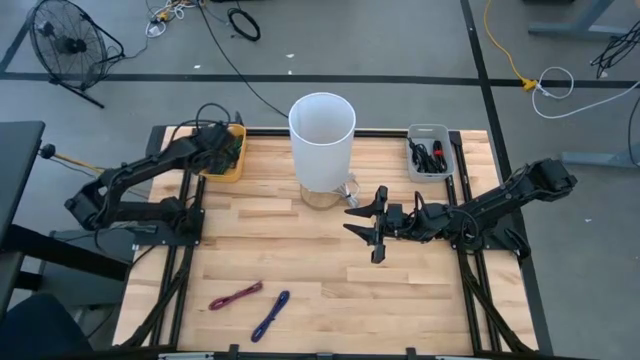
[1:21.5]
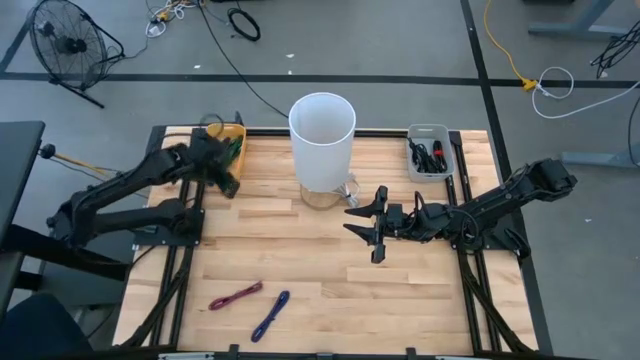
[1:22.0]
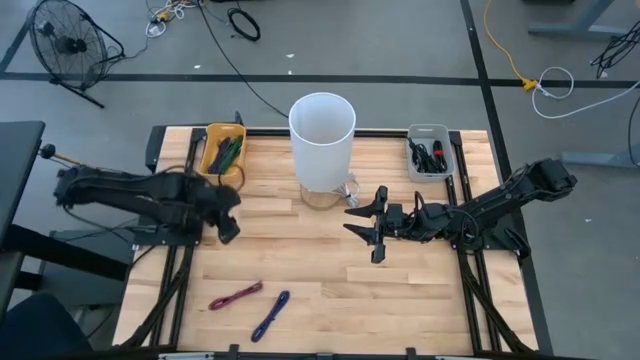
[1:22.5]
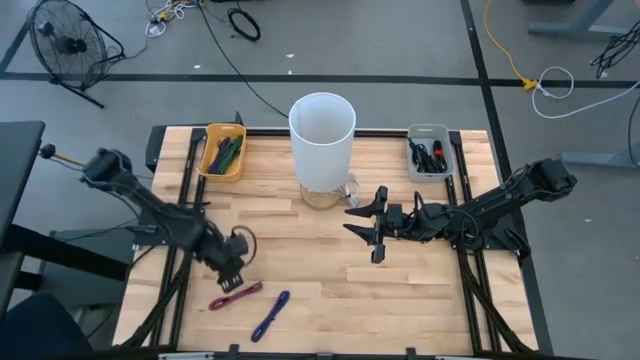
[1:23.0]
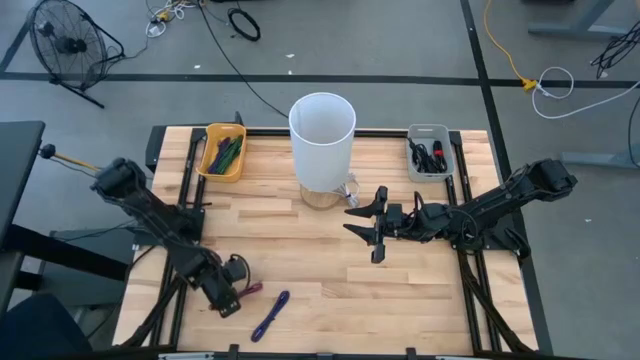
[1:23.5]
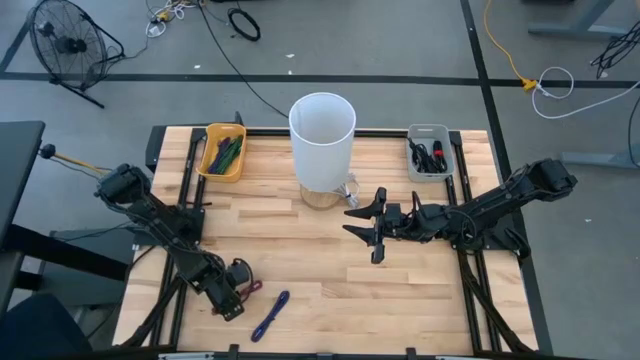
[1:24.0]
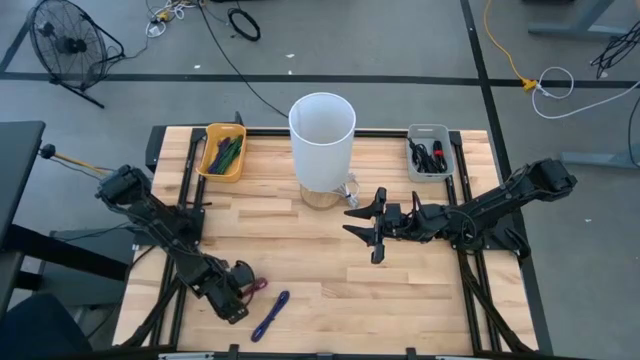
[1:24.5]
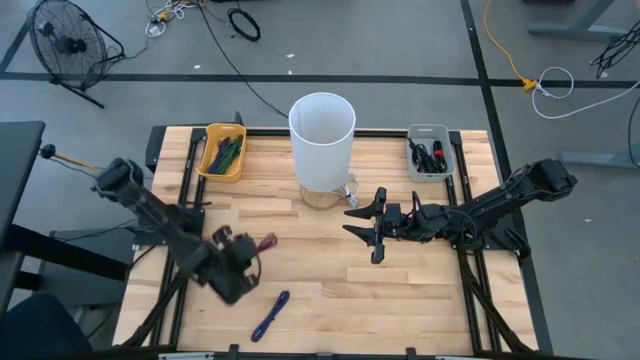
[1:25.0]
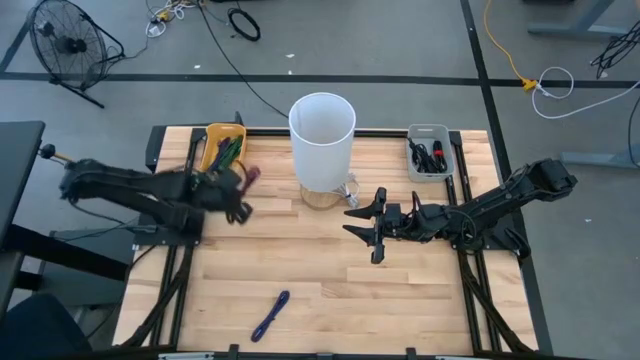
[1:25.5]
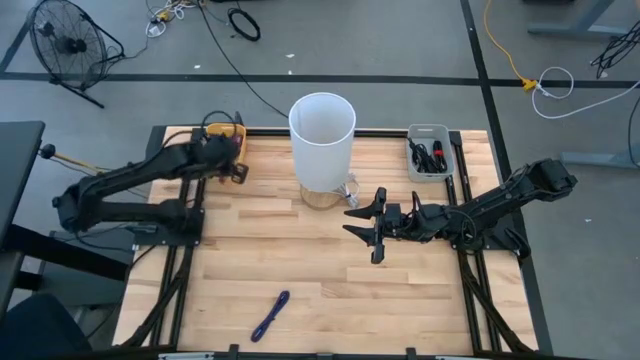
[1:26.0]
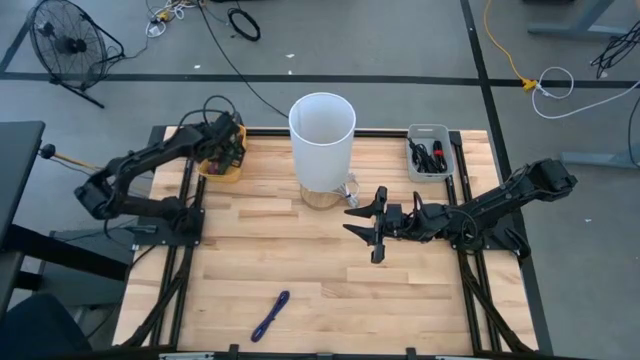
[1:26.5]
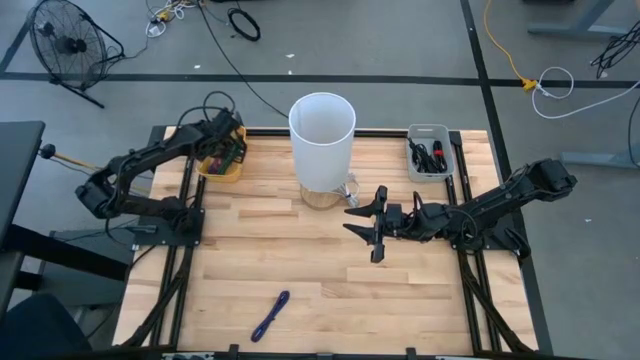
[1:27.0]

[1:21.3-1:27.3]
Task: Pick & Place USB Port
Put the pink USB cable into the yellow bin

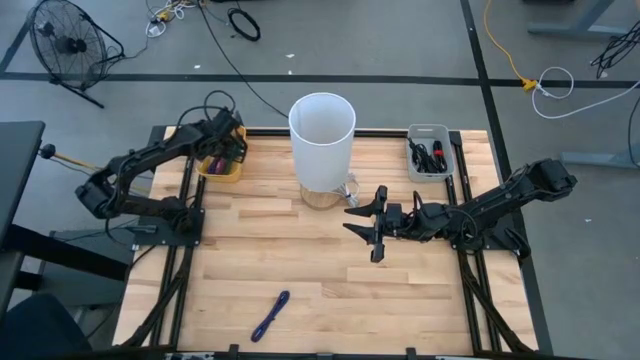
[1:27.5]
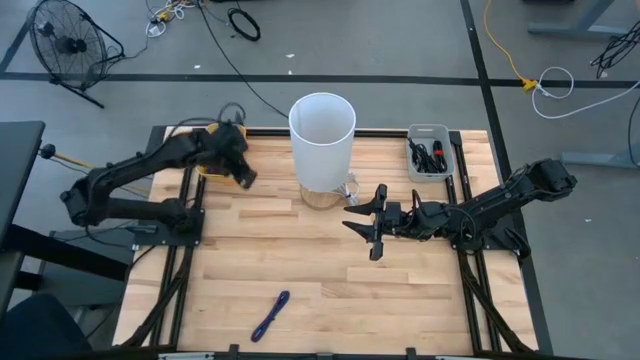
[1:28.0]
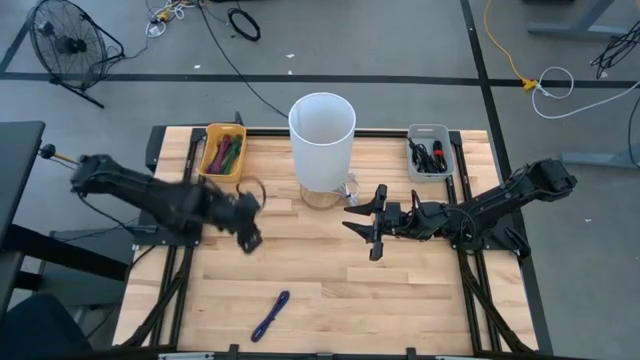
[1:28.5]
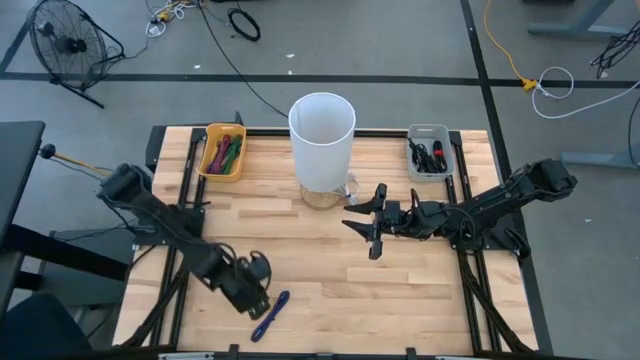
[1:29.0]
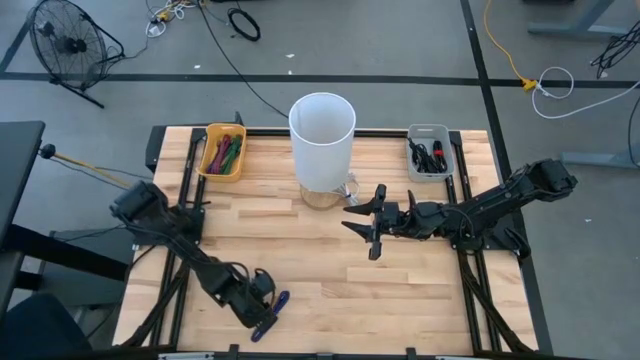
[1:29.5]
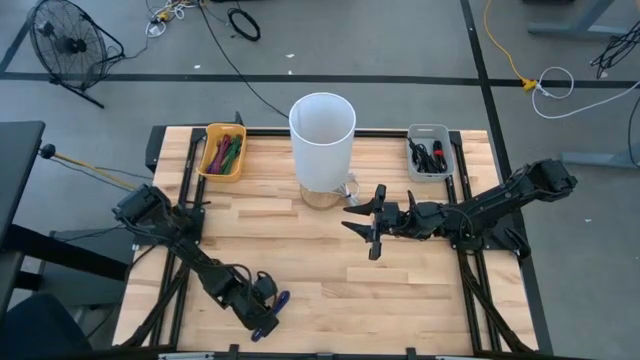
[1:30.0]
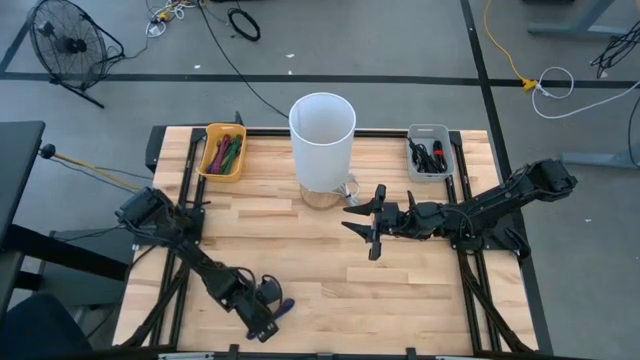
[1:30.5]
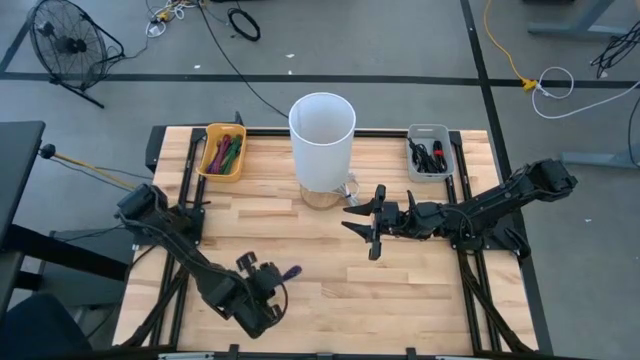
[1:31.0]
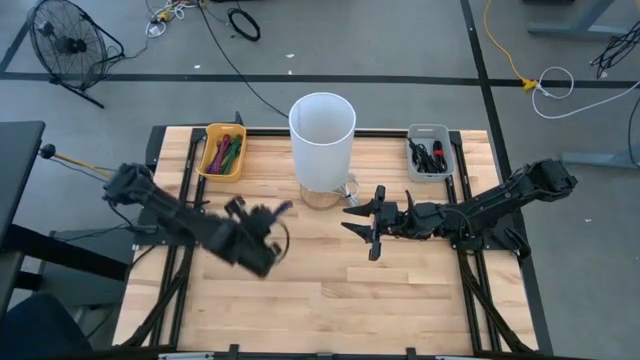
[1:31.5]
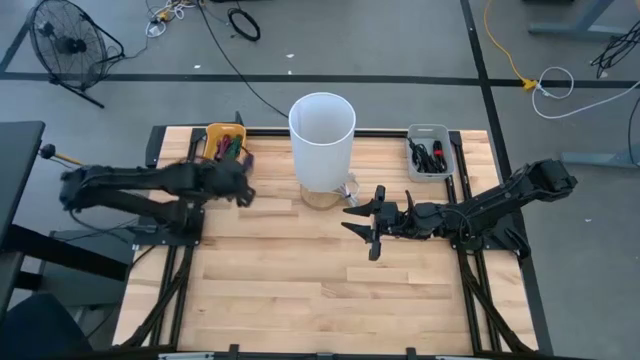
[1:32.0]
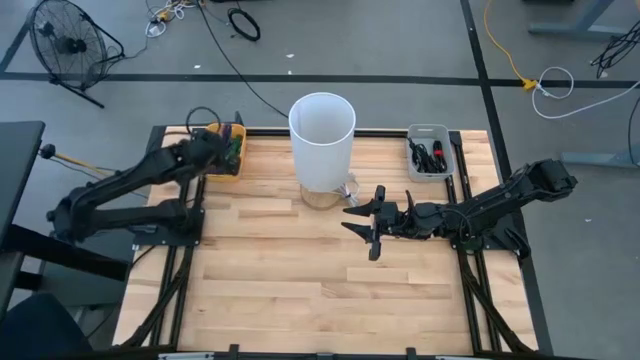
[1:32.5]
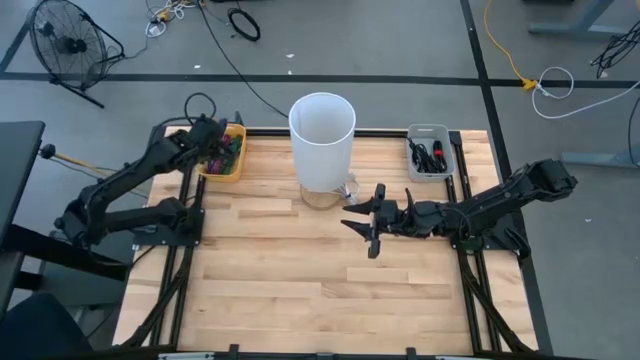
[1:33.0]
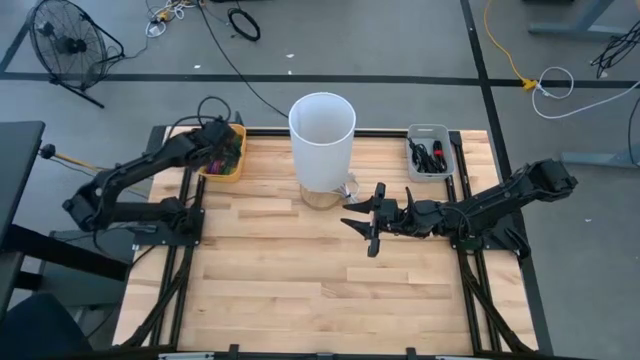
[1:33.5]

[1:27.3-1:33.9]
Put the violet USB cable into the yellow bin

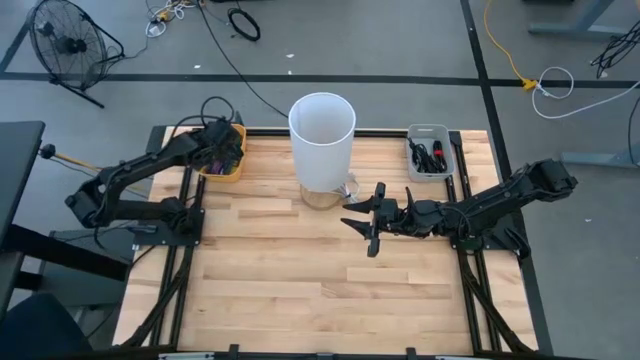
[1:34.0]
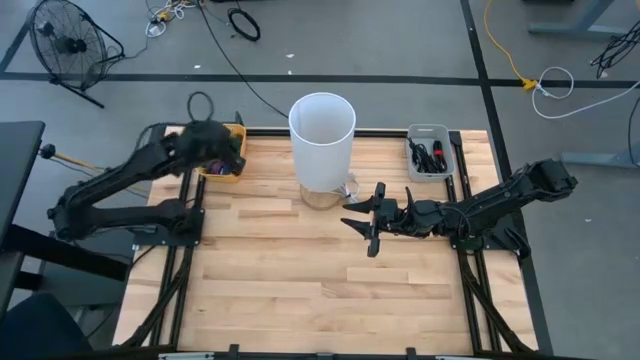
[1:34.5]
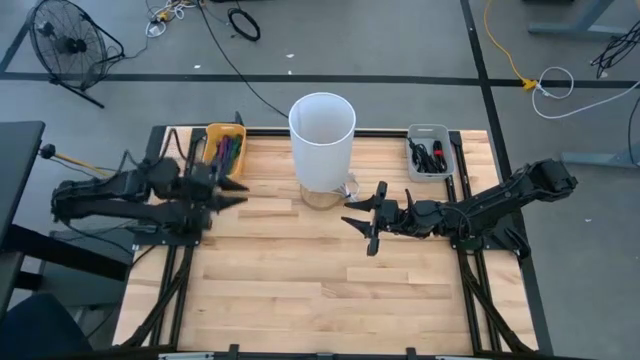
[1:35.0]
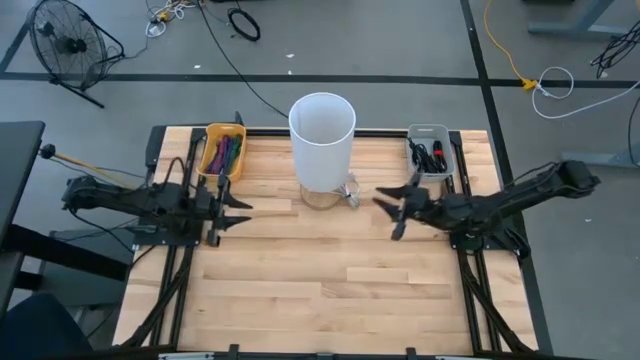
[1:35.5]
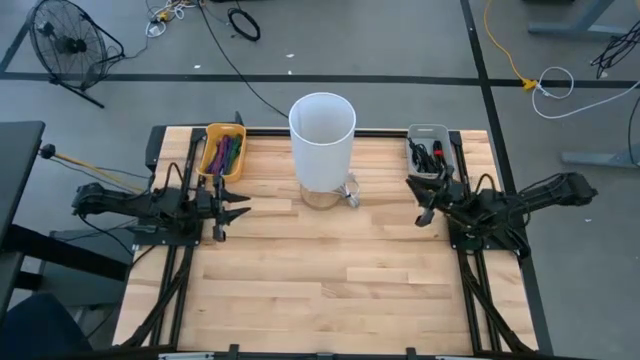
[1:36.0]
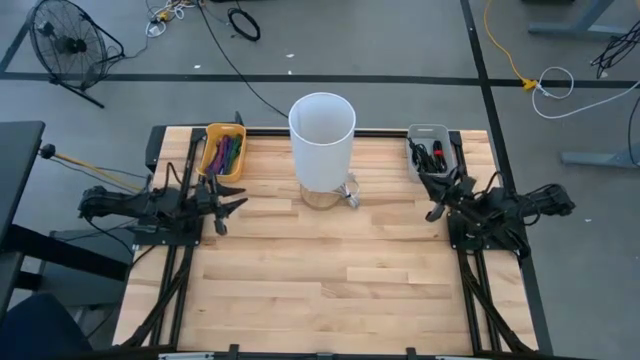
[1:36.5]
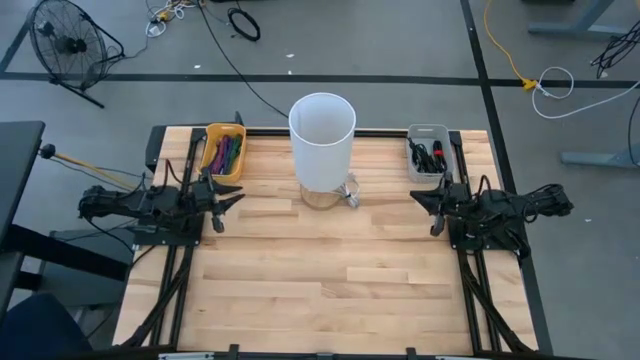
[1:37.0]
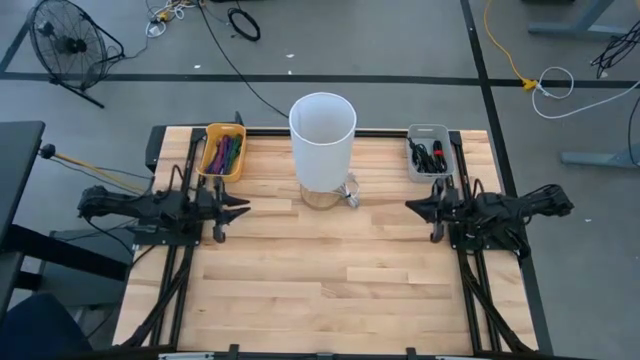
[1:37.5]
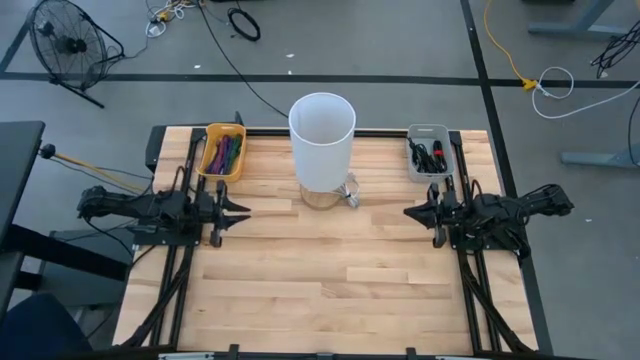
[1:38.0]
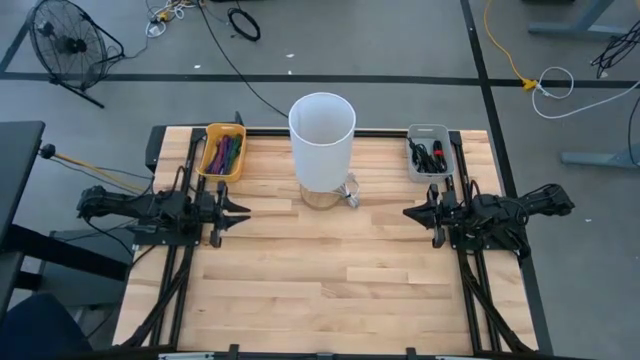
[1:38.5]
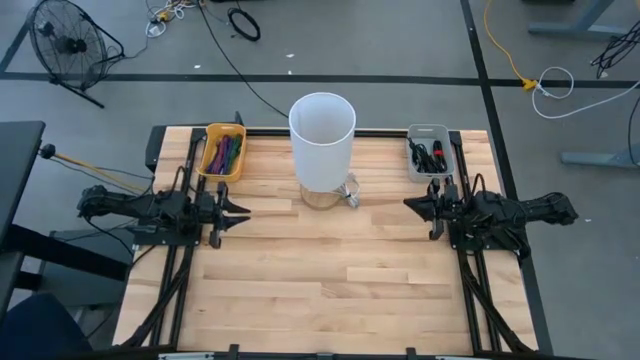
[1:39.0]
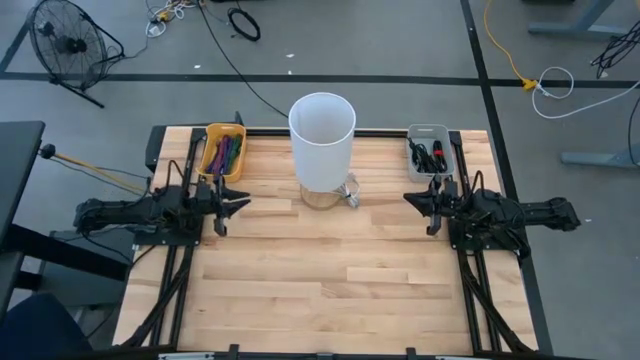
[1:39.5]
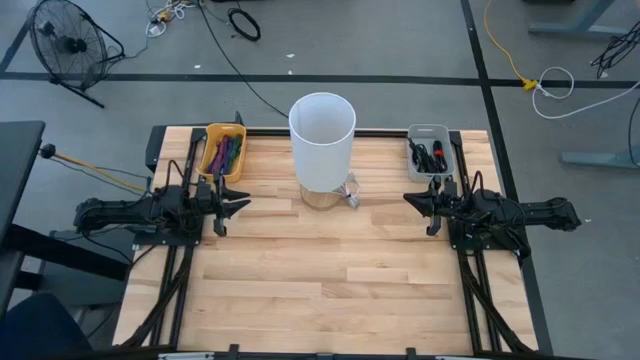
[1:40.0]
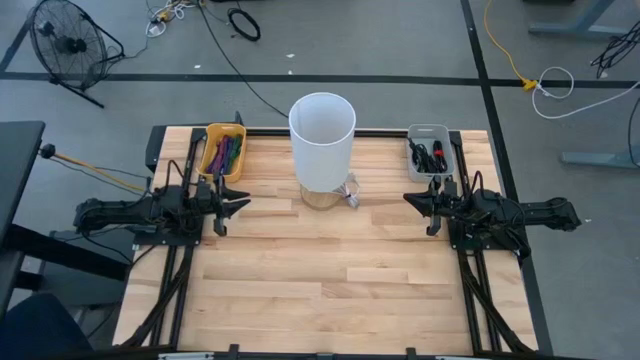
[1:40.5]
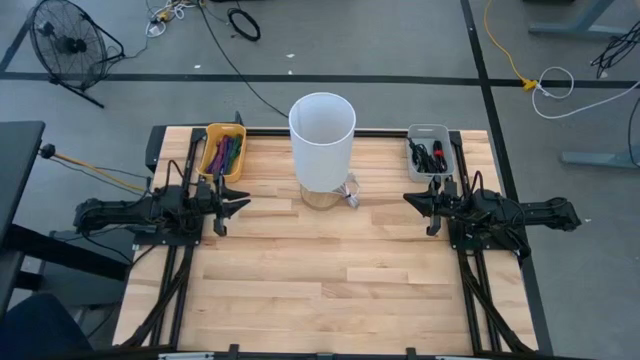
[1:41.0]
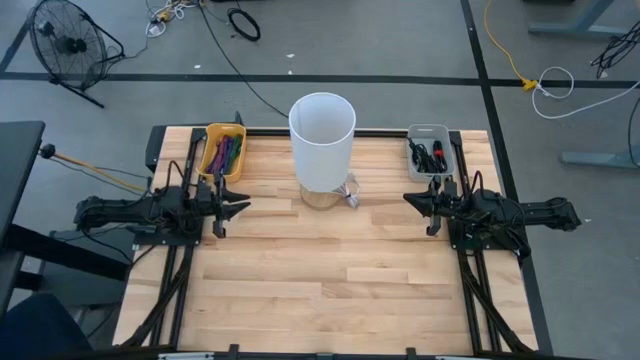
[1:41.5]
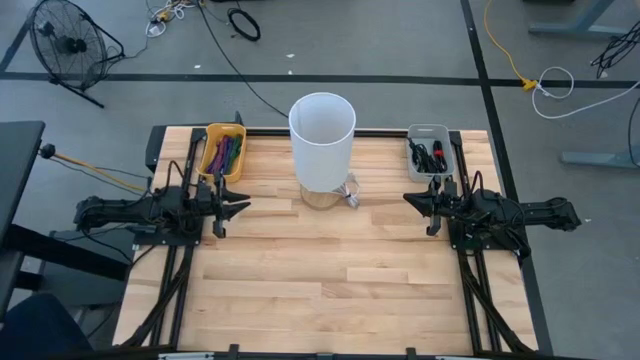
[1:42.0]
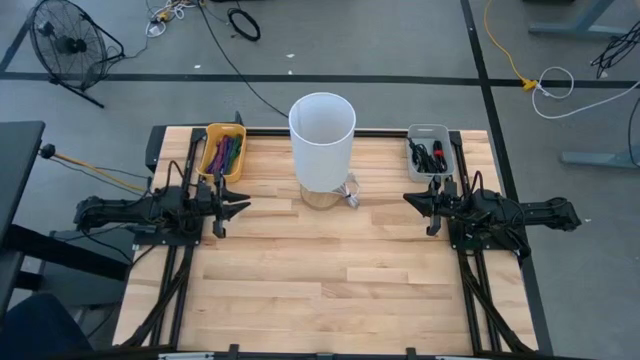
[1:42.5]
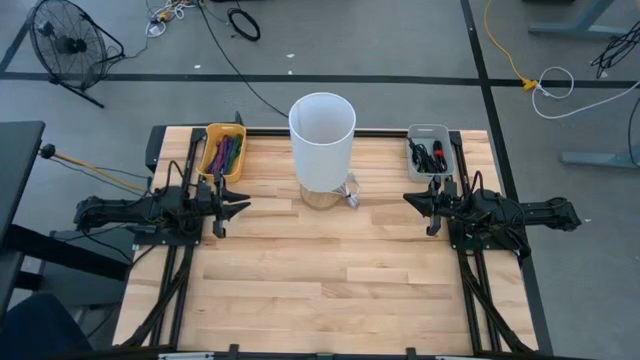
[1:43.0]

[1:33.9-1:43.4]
Return to Home Position

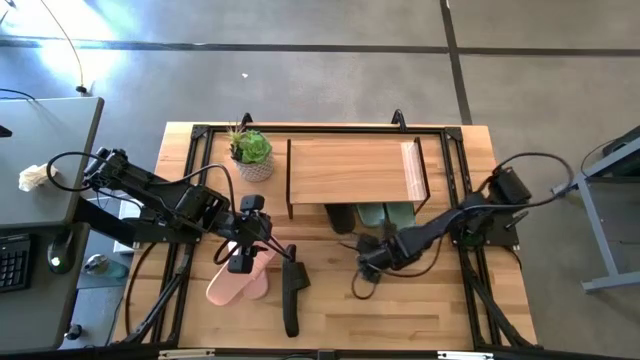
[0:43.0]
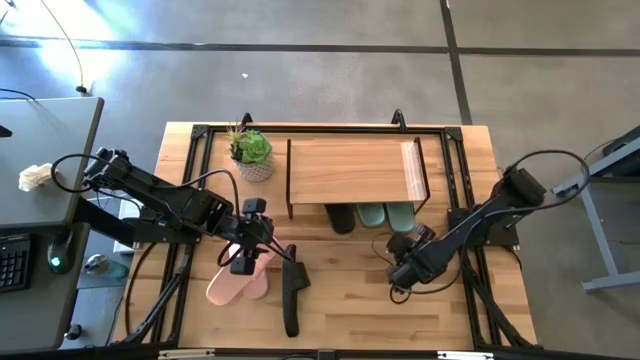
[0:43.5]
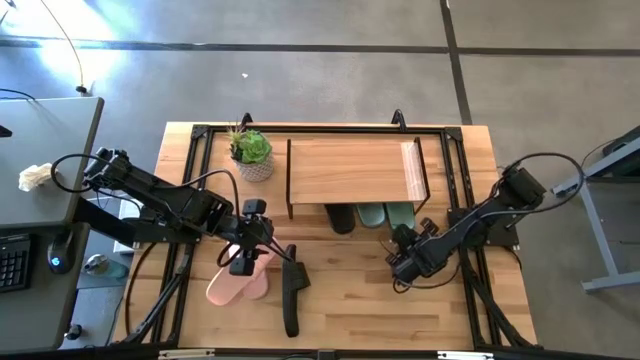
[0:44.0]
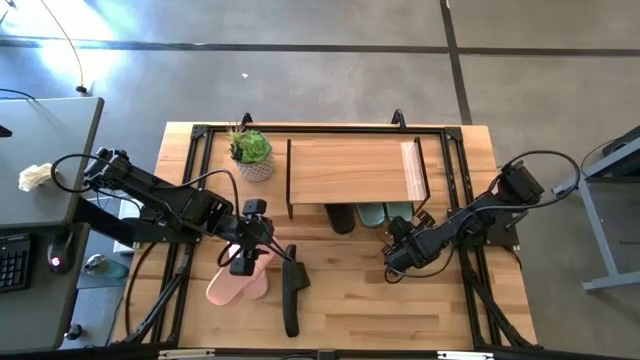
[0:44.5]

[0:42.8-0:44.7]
Task: Pick and place slides into the shelf
Adjust the right green slipper under the shelf
